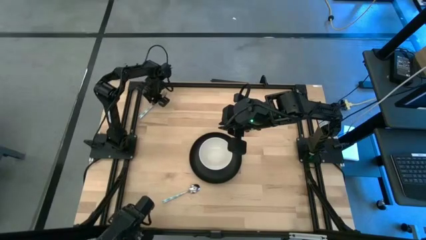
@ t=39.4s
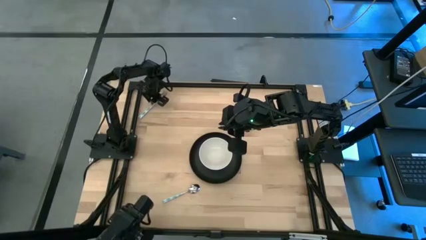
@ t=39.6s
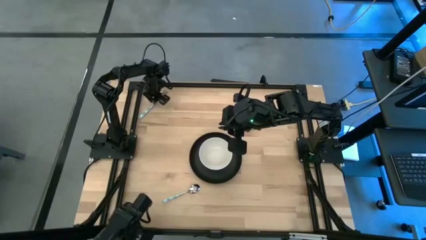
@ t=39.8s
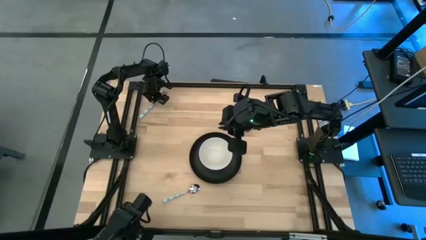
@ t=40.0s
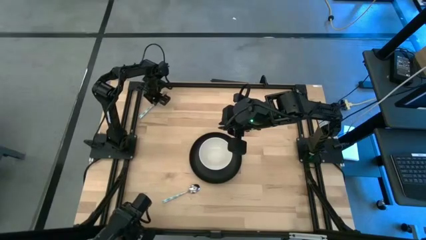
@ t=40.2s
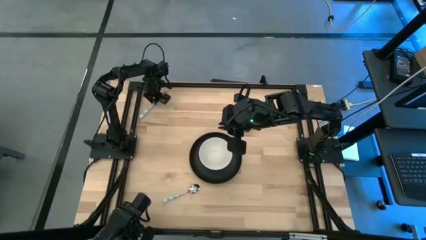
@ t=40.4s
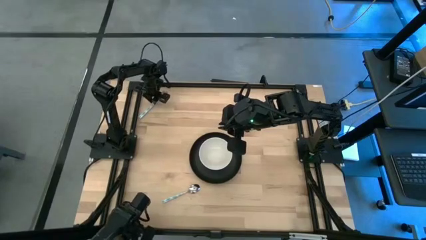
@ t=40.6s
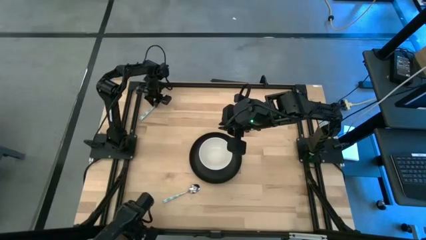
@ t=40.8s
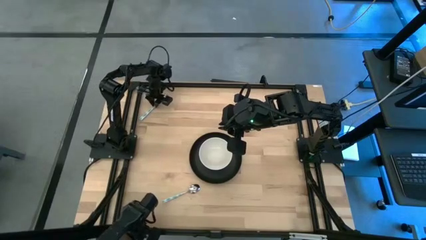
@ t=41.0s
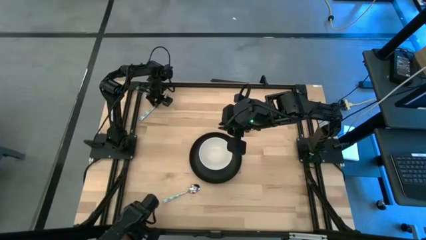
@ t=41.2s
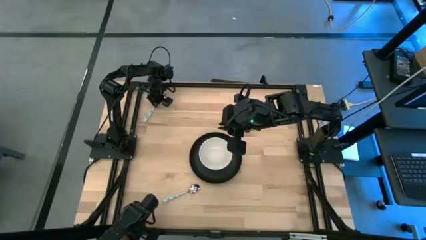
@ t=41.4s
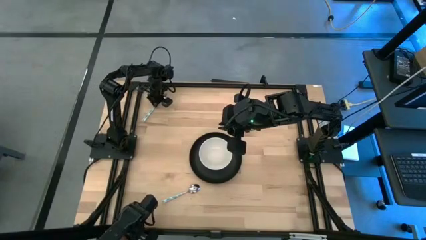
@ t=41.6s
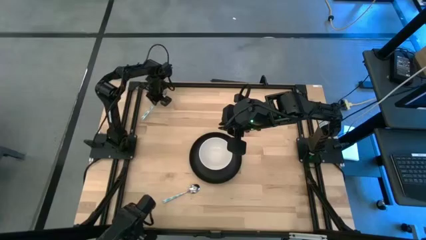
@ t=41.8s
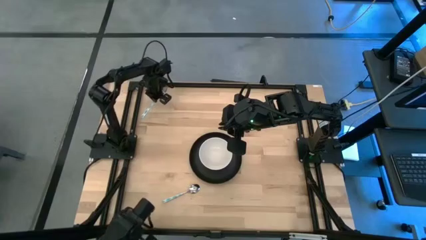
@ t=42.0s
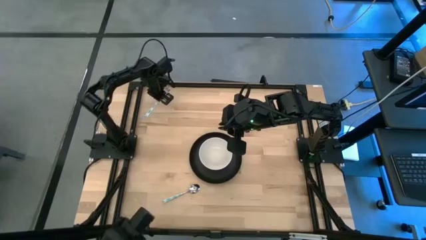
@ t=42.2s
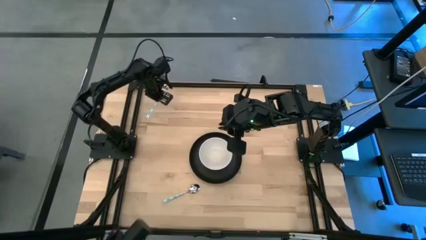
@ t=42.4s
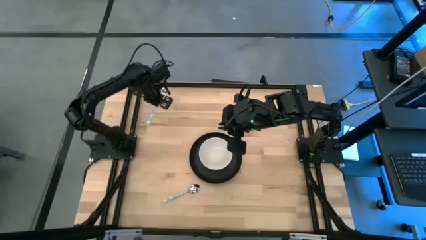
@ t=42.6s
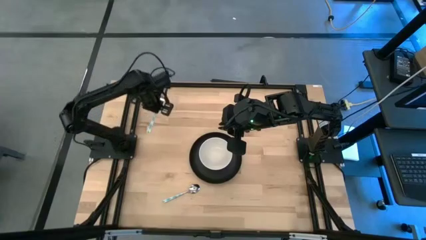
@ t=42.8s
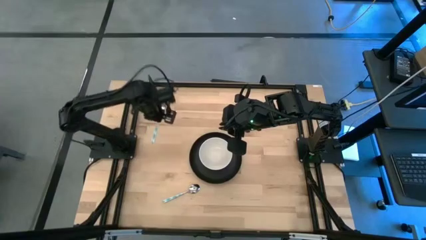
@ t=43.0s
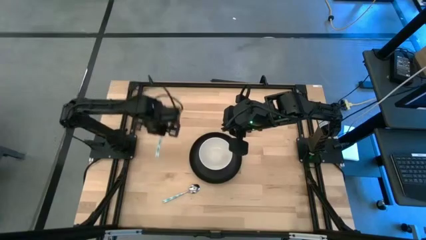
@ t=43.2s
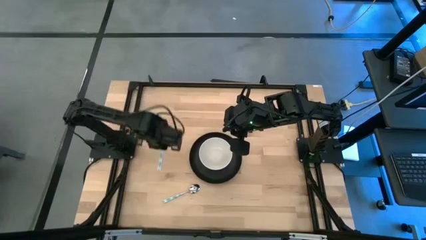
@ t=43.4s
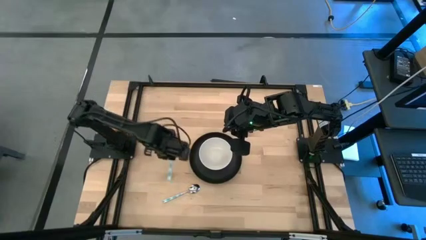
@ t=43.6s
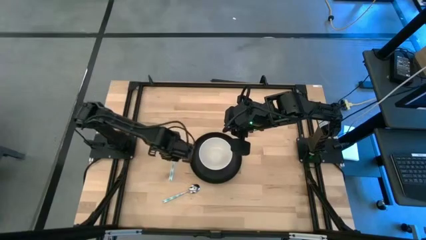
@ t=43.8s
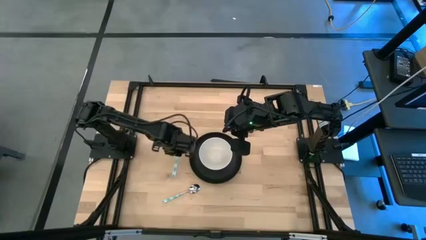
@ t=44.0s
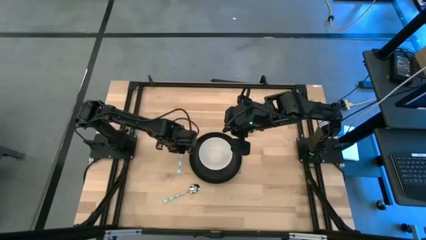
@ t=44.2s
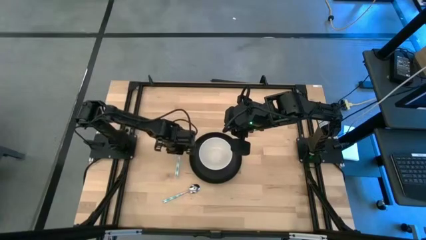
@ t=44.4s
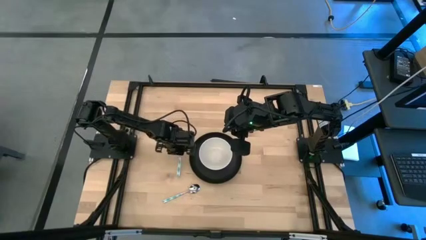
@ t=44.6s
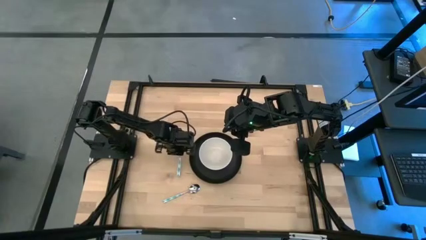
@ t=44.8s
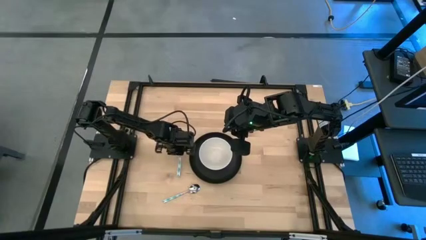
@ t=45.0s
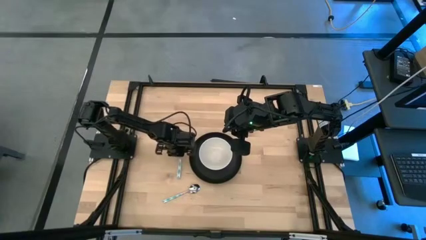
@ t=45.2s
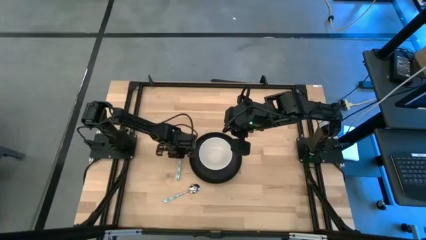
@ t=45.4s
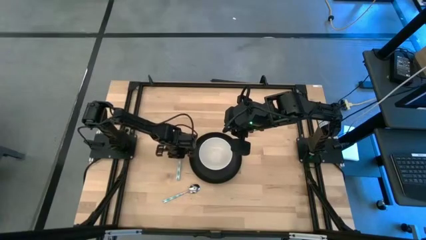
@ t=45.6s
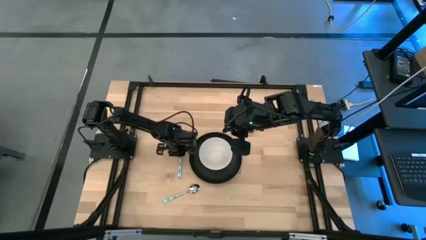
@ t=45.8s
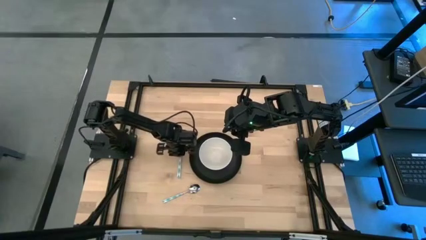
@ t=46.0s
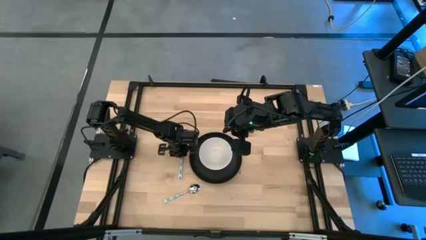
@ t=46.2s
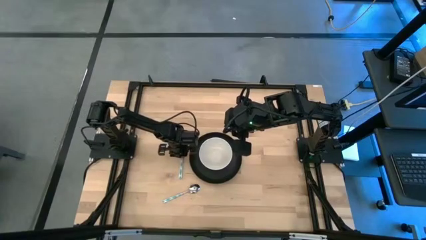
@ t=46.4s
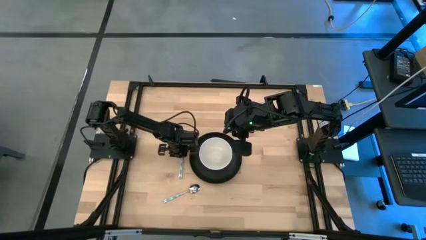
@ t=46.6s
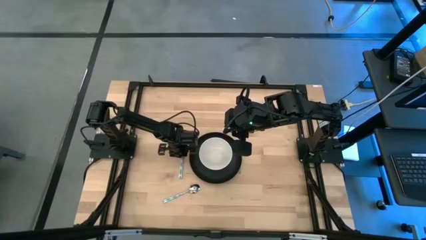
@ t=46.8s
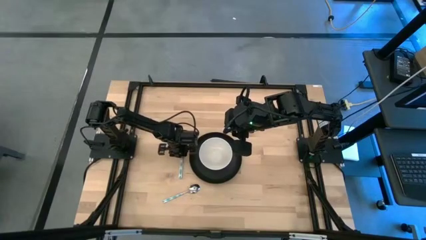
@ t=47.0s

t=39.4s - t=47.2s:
Task: Set table place
Move the blue fork to the left of the black plate

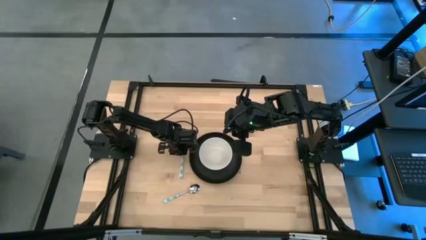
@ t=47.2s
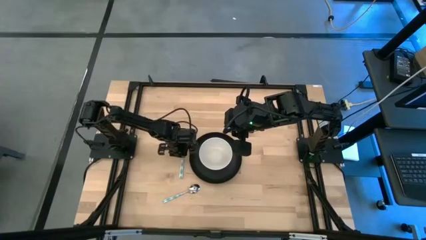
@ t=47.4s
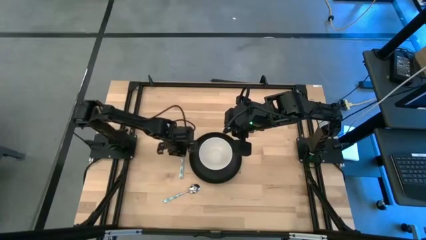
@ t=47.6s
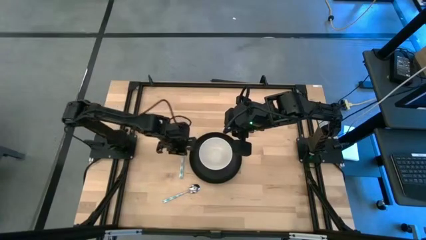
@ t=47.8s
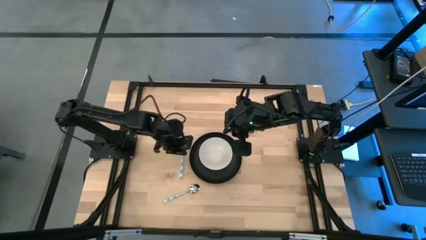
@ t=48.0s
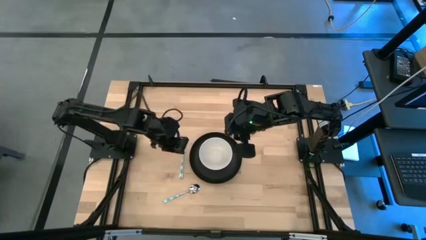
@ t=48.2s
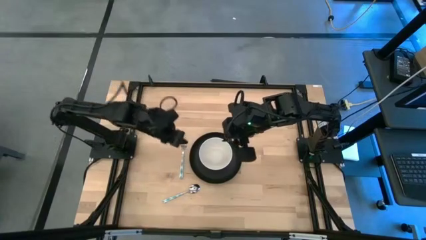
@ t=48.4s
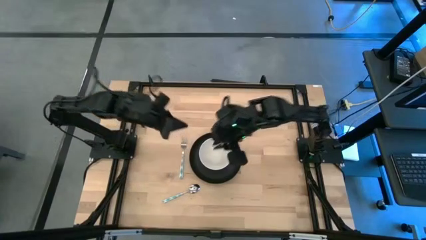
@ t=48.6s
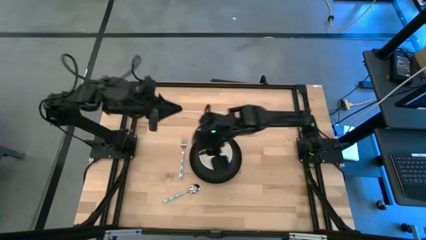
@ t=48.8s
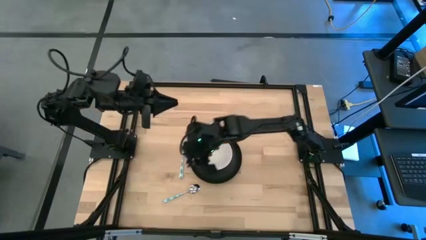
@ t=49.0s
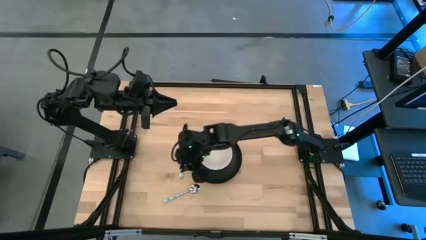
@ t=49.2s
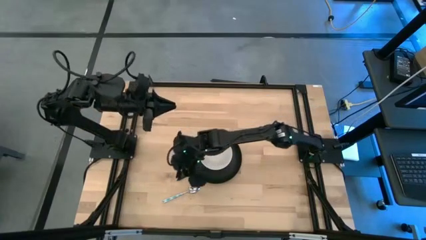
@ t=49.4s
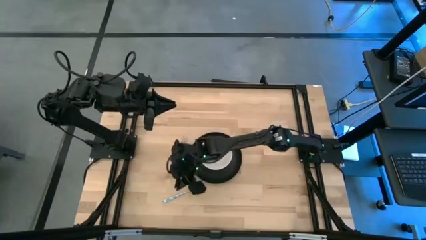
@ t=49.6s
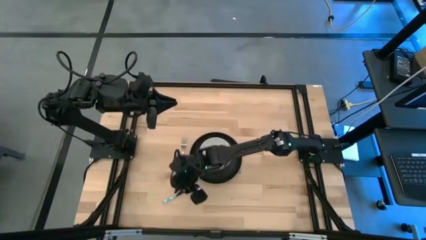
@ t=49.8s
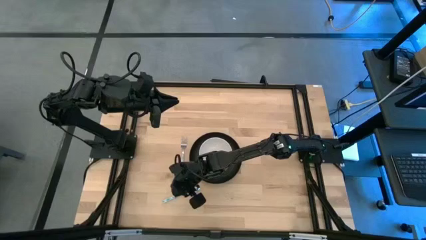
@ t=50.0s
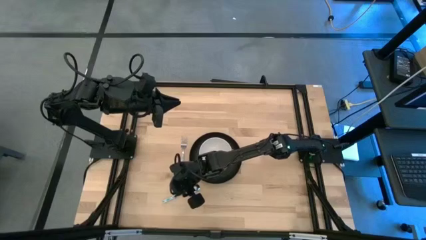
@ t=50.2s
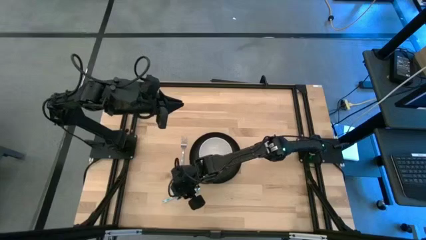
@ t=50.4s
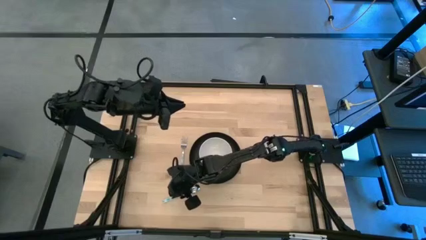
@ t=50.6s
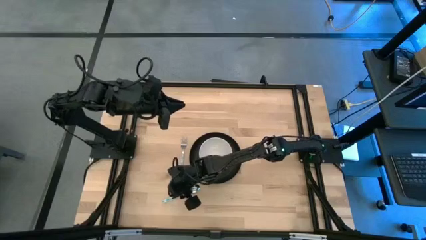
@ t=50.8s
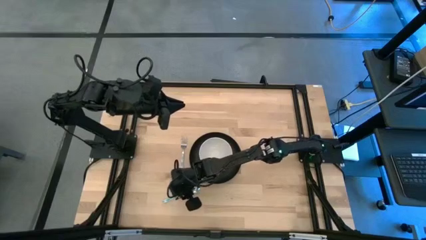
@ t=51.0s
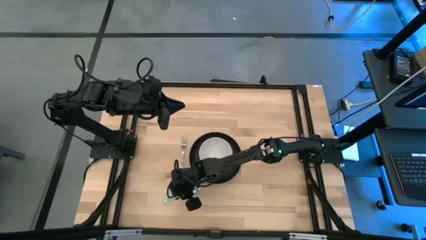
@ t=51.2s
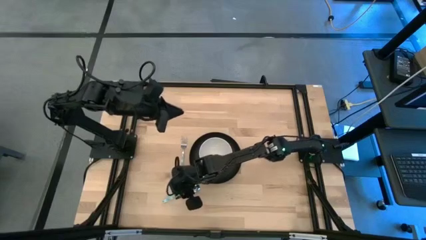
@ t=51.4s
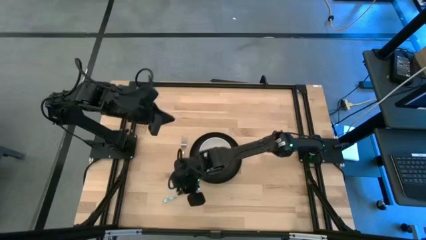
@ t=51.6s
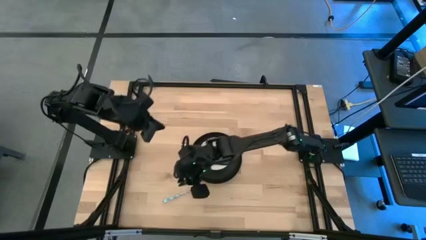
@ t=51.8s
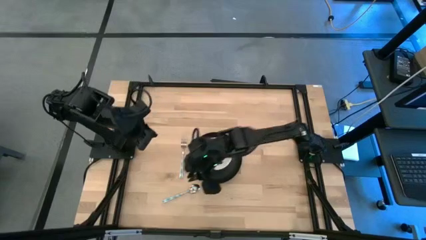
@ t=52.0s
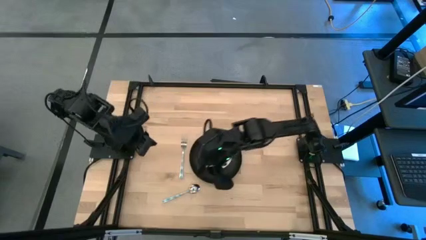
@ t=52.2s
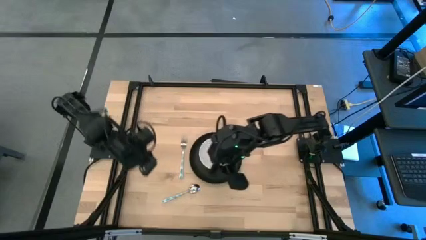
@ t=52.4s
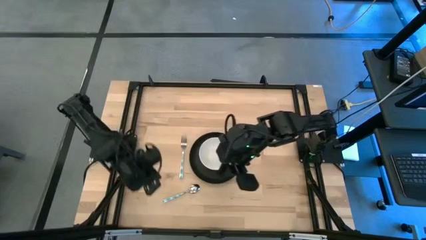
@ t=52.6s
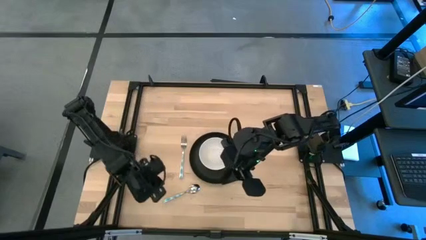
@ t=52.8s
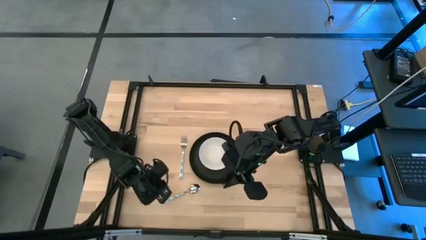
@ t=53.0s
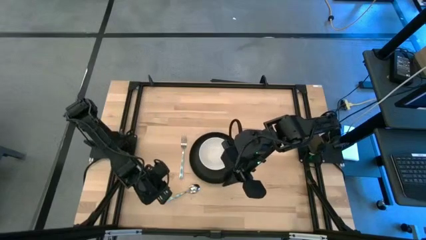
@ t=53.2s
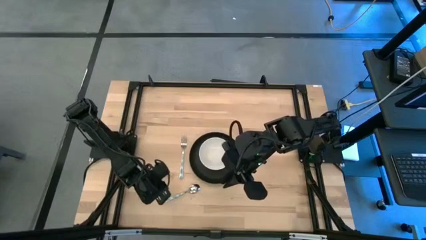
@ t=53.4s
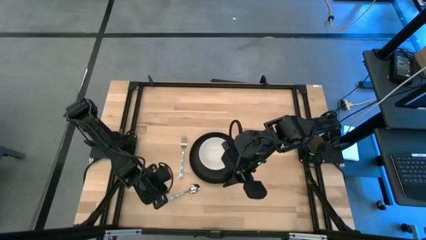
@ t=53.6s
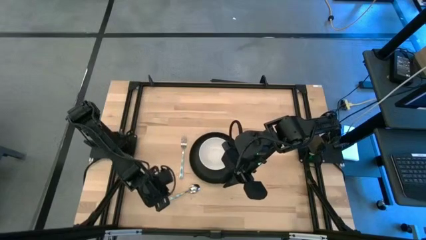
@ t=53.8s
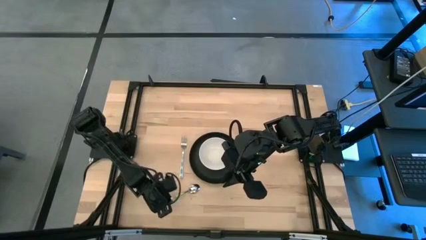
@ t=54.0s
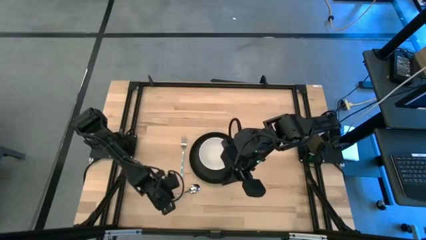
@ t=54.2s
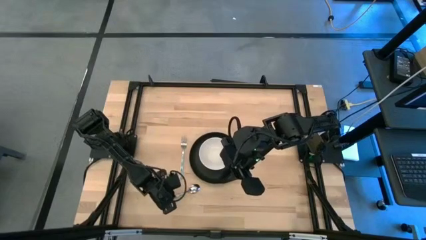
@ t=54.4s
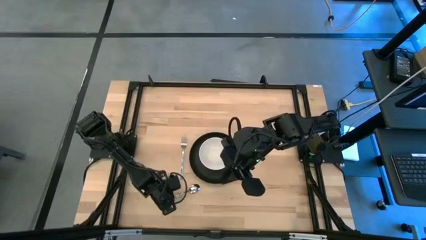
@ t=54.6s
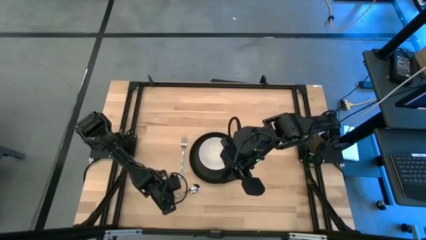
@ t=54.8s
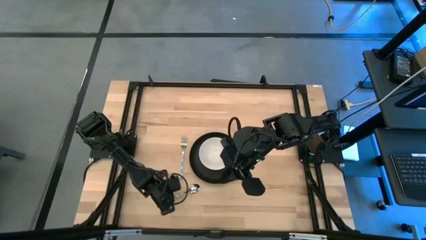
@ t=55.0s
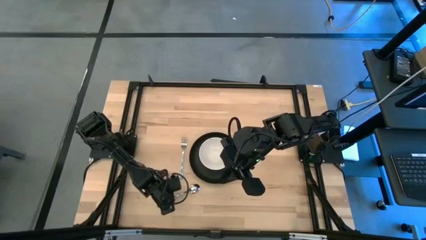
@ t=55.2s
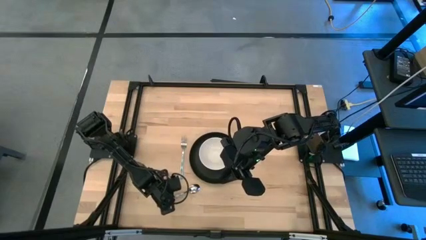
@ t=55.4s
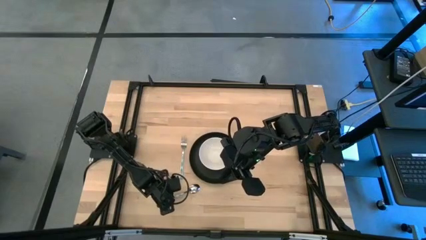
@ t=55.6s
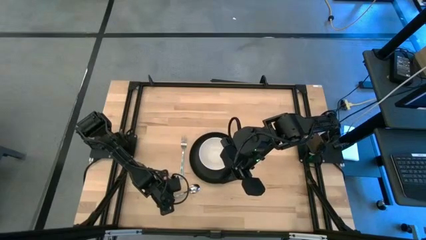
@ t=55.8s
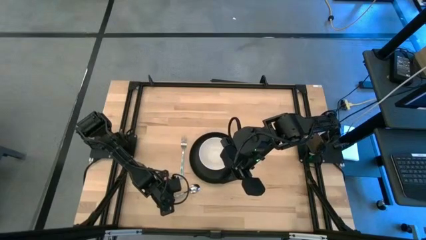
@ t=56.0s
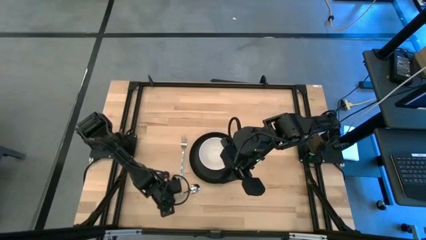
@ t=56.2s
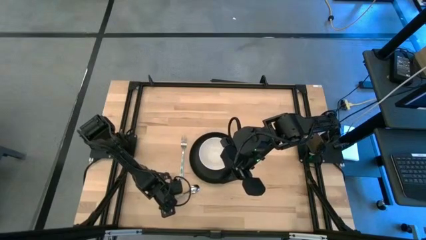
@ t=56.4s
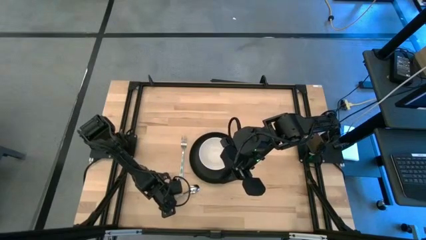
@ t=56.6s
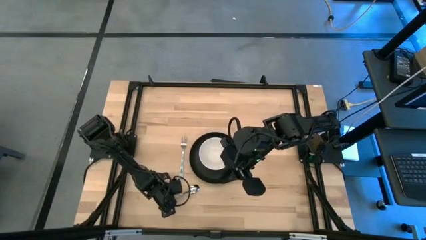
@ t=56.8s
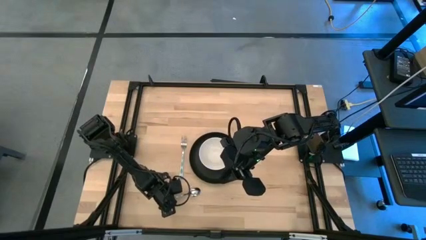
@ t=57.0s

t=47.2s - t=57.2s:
Put the blue spoon on the white bowl
